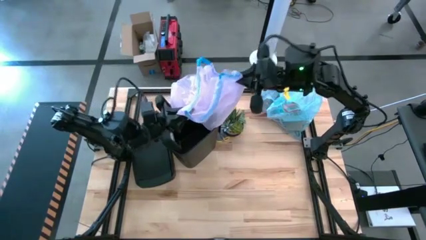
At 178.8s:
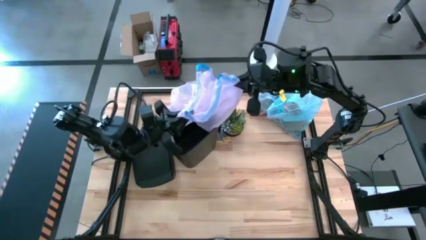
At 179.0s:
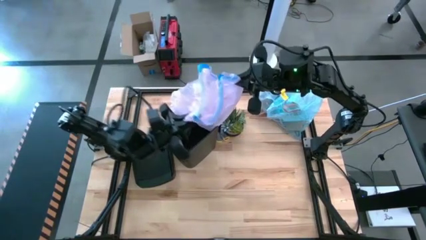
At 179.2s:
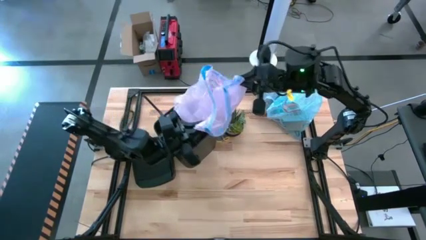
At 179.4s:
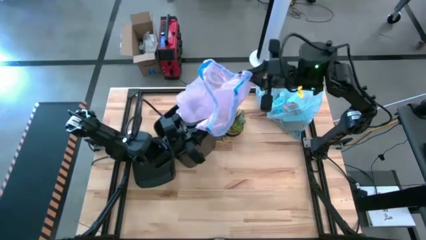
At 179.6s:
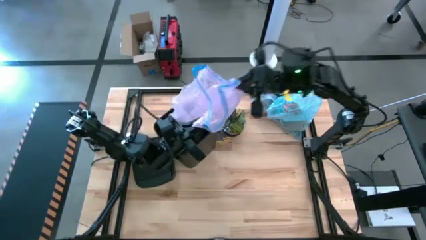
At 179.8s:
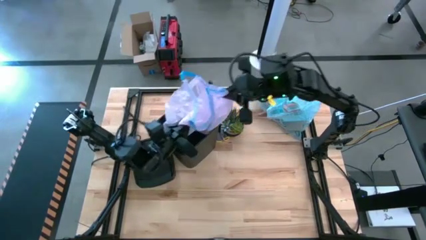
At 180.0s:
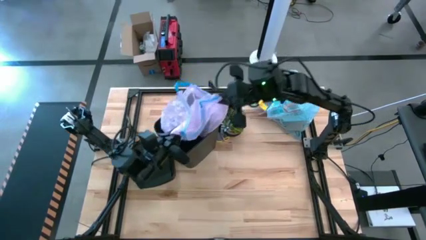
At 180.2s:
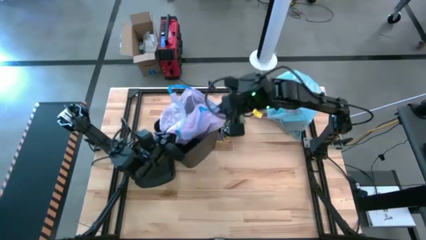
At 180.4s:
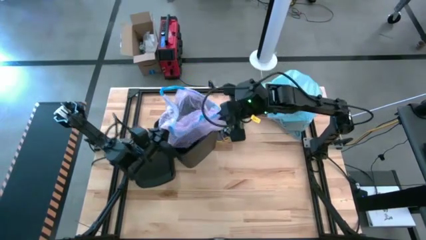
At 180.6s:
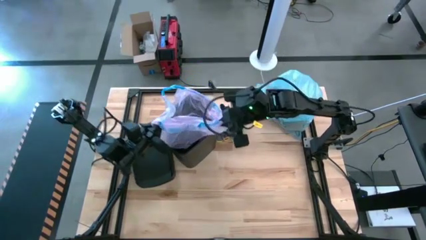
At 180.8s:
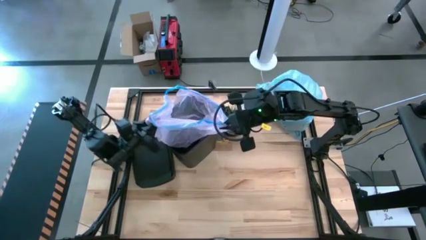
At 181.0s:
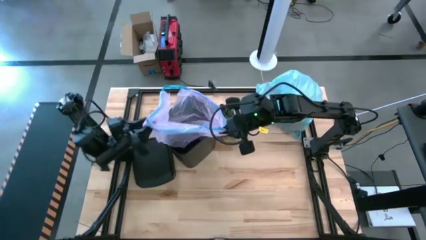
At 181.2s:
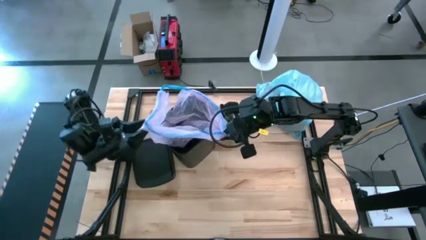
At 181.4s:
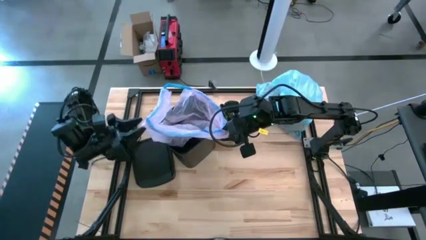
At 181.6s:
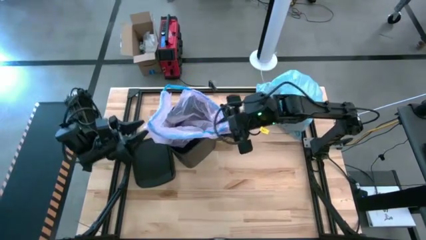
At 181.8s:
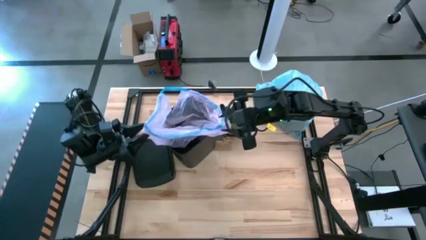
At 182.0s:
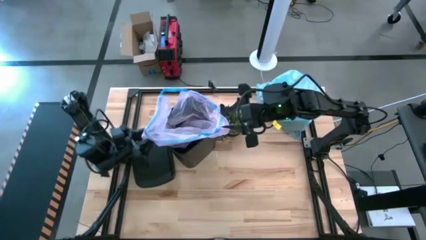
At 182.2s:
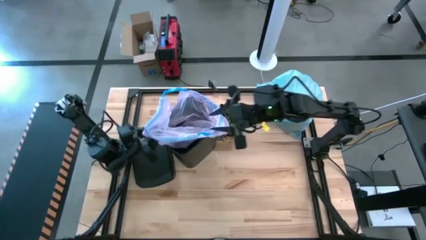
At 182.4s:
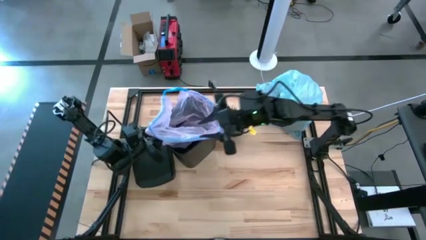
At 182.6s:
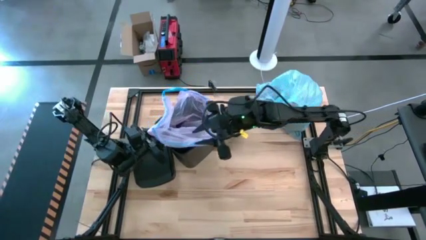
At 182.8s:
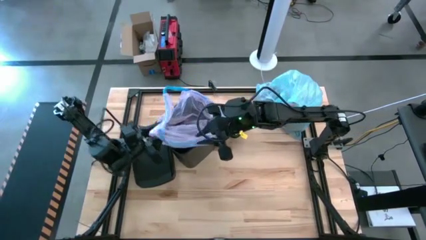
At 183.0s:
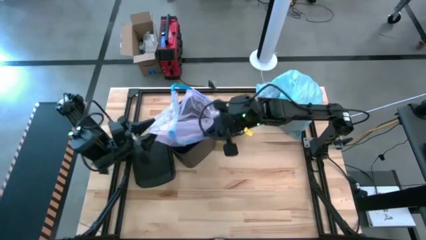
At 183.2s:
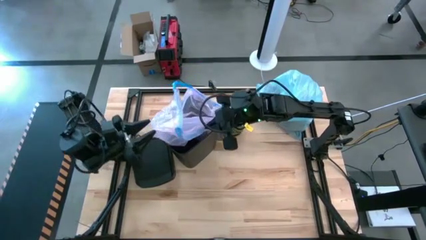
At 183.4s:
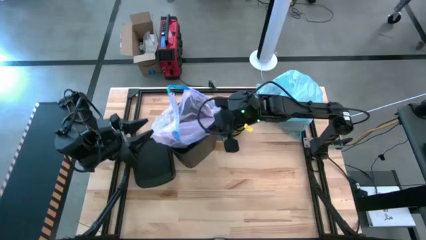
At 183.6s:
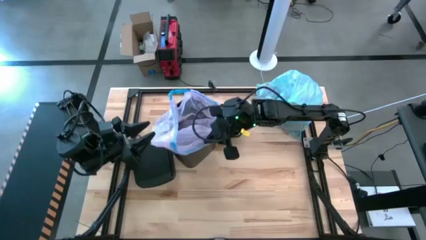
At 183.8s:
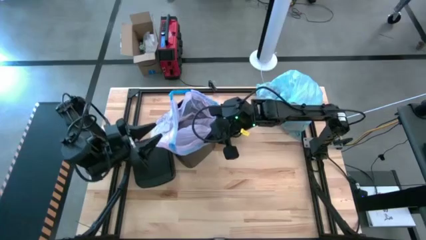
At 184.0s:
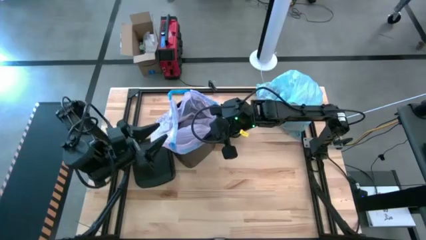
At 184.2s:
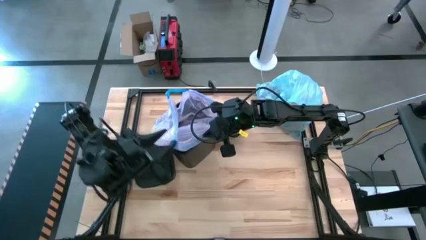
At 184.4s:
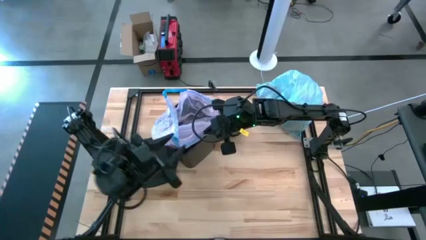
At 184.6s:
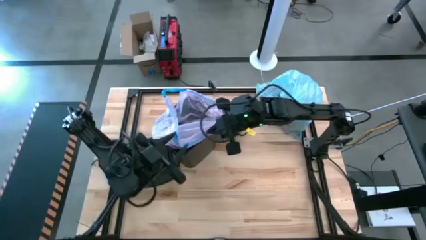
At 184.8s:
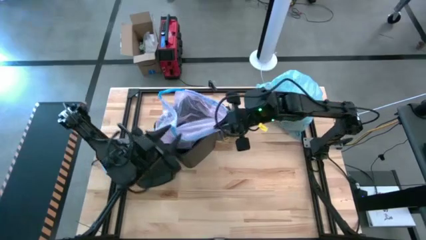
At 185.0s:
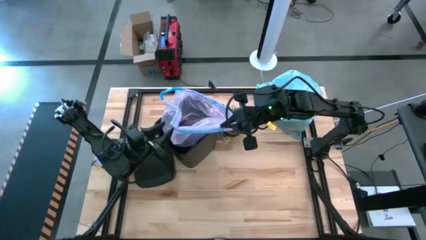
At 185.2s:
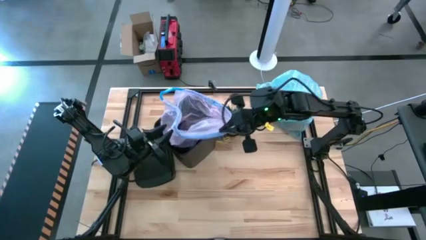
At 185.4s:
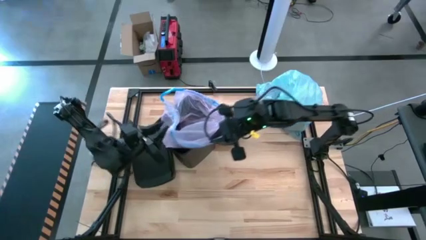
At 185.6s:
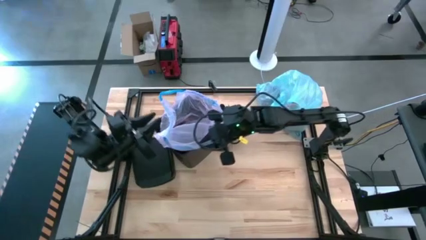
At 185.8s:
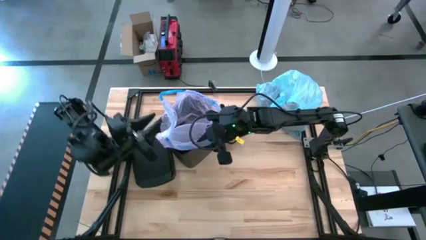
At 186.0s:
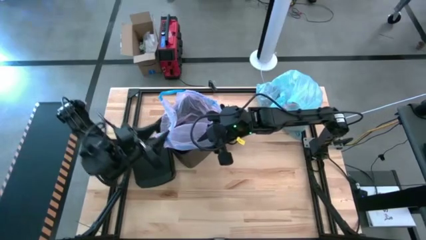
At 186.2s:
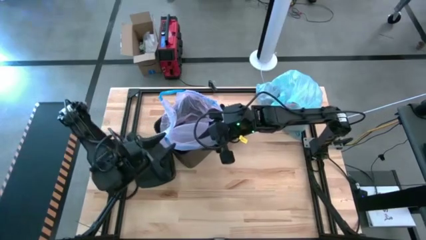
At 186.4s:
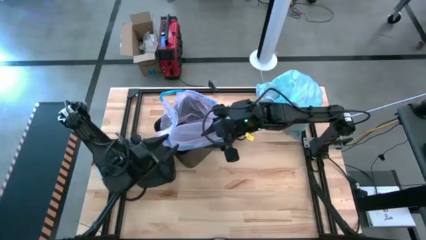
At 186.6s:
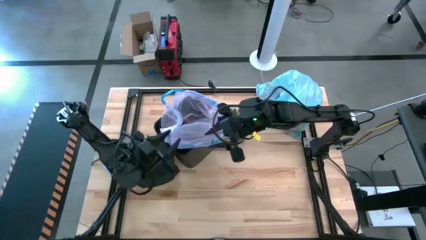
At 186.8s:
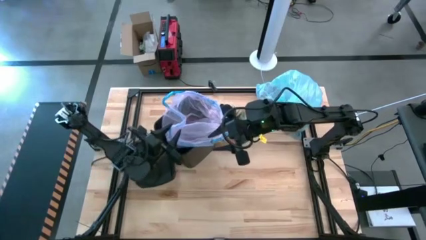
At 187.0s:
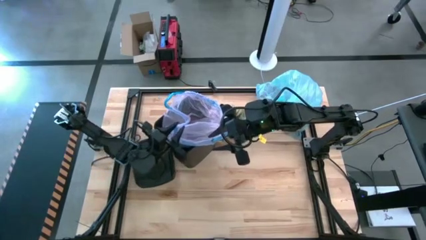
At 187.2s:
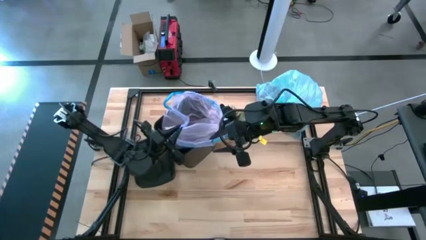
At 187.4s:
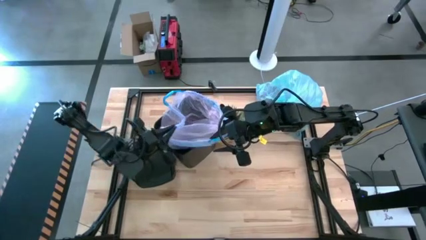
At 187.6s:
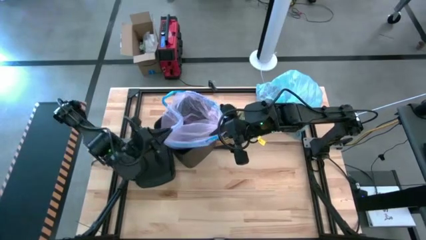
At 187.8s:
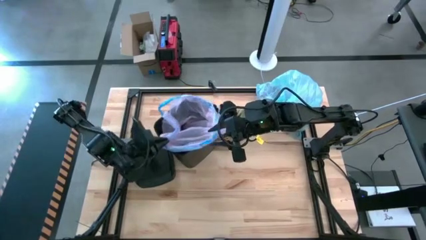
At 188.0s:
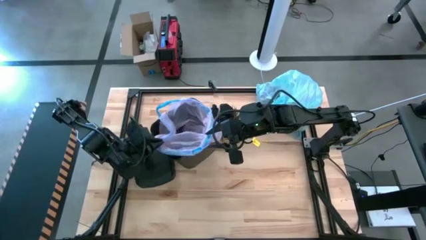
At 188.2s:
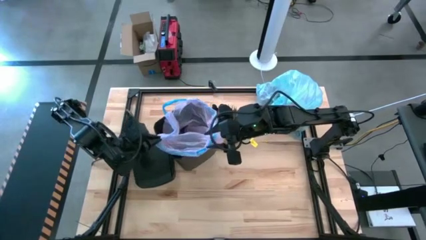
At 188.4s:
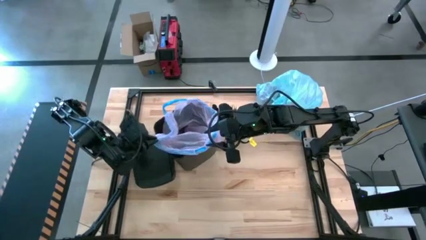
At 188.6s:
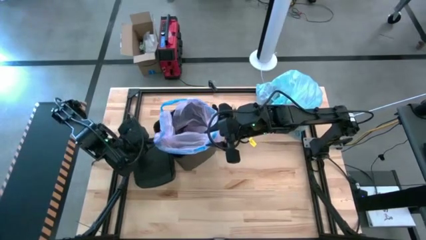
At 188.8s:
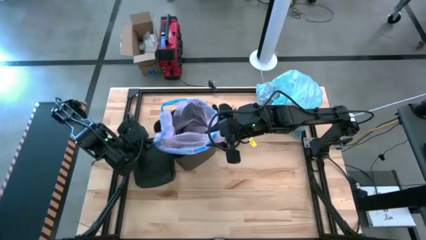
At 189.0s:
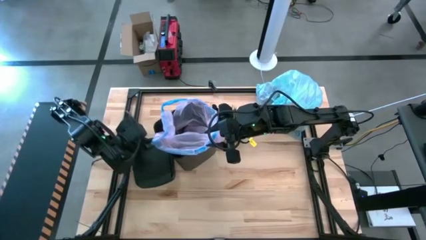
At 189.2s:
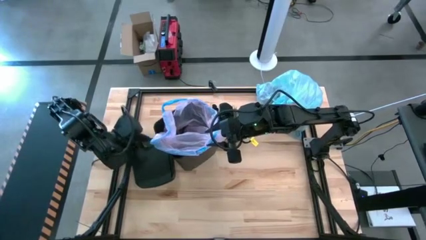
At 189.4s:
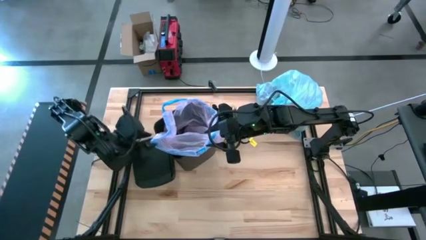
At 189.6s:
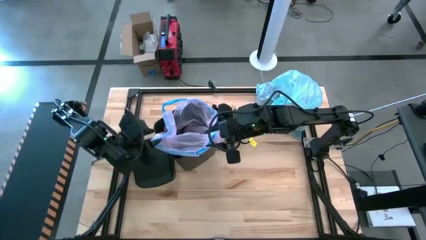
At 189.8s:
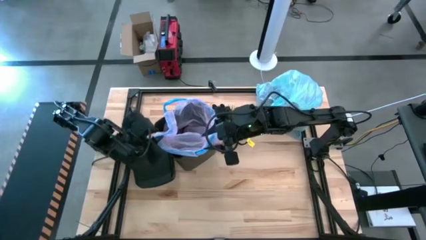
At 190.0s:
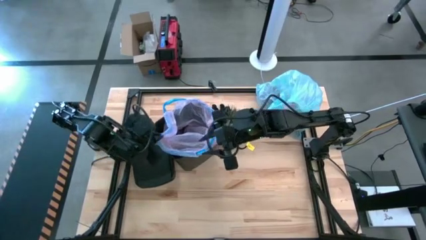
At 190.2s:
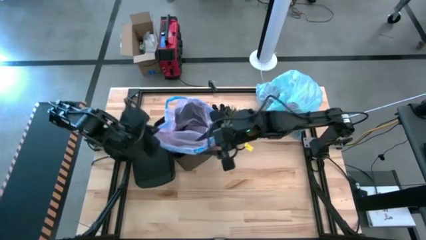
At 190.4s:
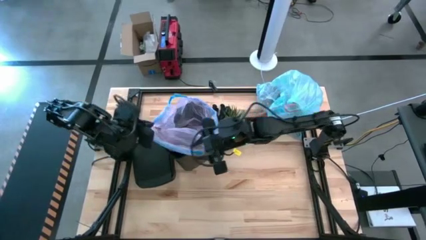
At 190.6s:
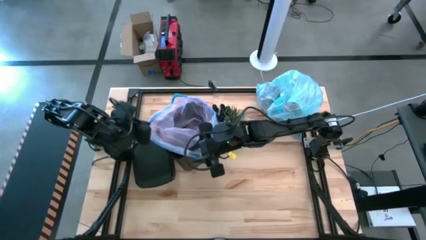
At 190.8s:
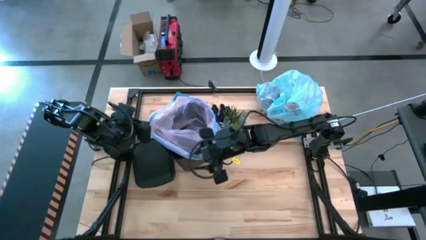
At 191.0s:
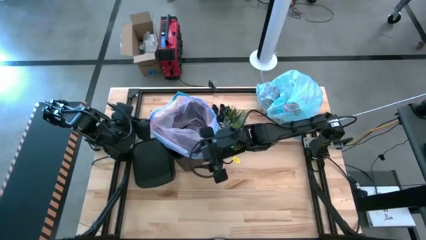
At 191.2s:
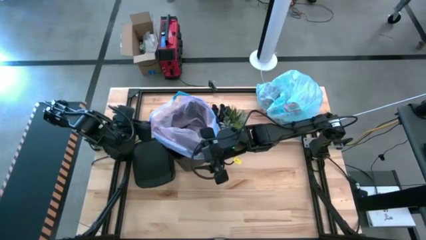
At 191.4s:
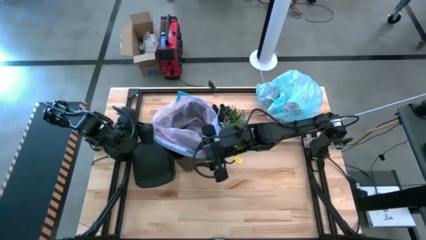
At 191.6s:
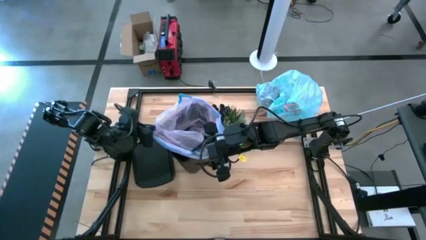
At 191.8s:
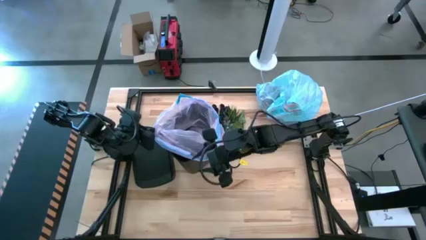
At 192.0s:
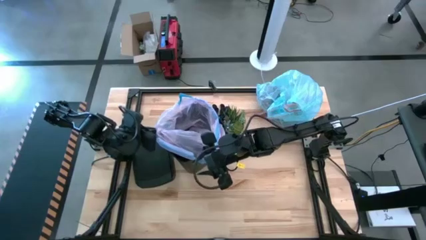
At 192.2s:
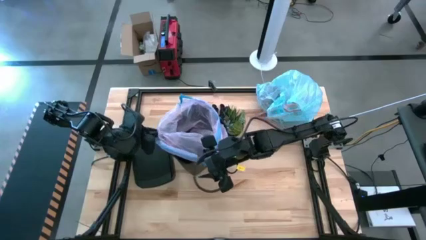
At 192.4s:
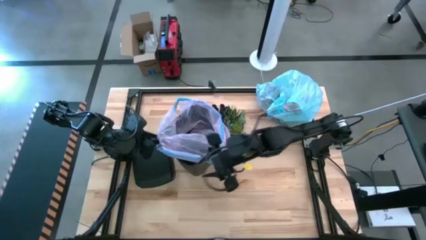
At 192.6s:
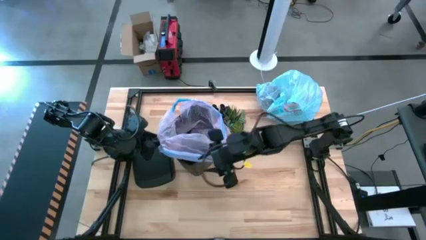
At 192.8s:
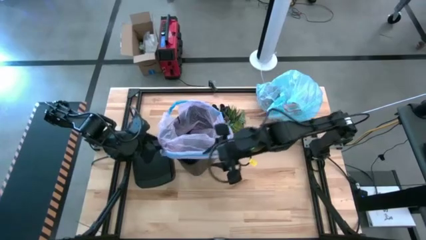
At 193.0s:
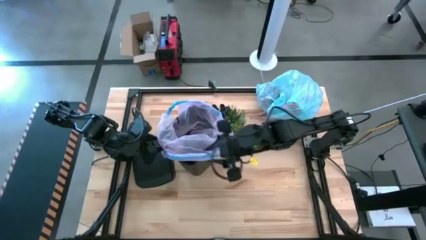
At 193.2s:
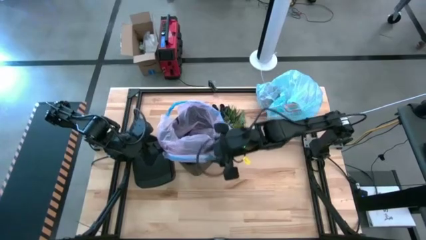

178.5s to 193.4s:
Task: place trash/remove bag and relplace
Insert a new pink trash bag into the trash bin

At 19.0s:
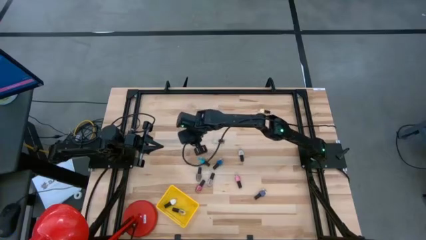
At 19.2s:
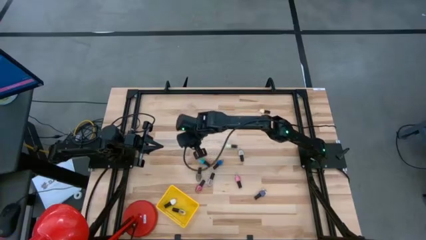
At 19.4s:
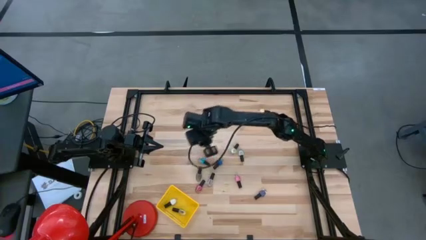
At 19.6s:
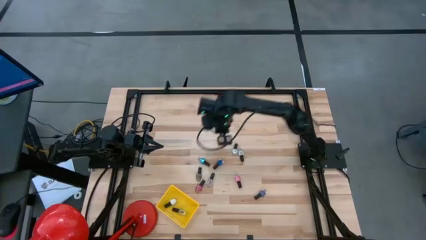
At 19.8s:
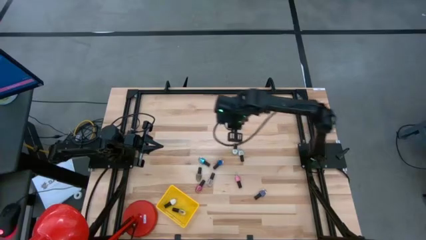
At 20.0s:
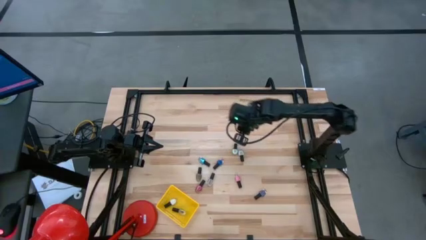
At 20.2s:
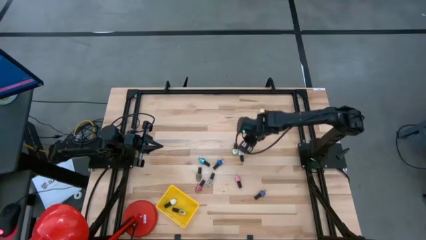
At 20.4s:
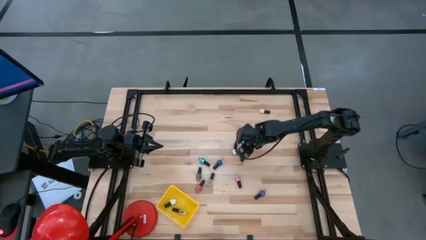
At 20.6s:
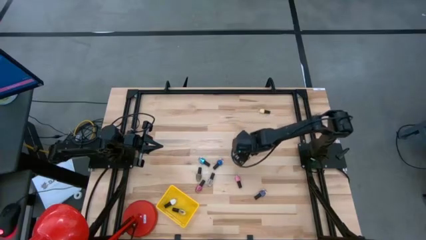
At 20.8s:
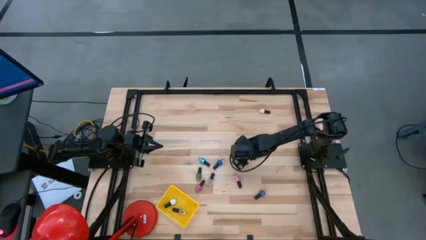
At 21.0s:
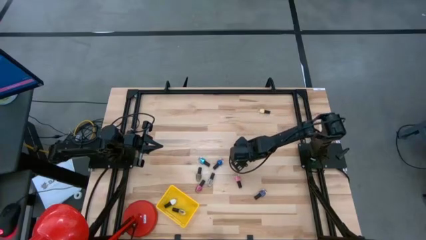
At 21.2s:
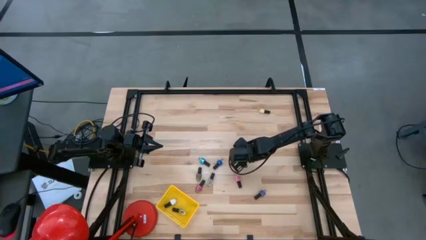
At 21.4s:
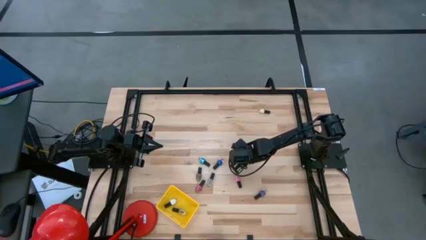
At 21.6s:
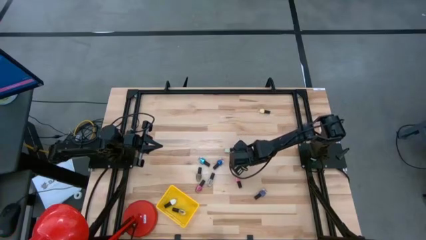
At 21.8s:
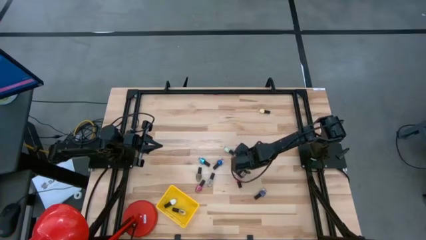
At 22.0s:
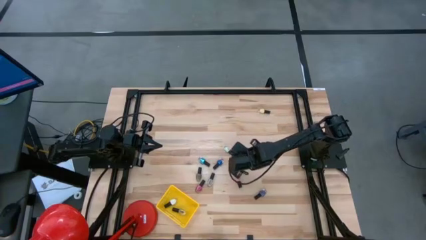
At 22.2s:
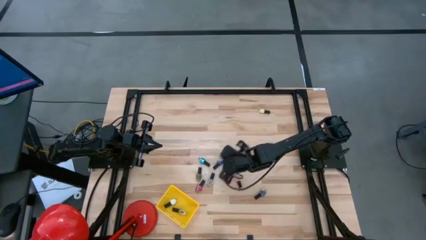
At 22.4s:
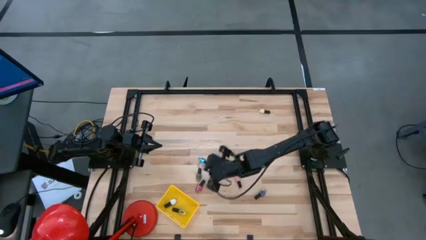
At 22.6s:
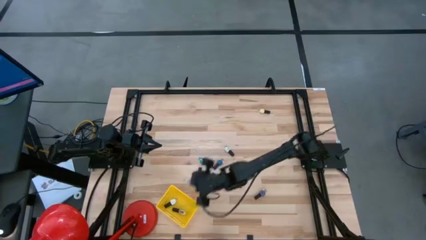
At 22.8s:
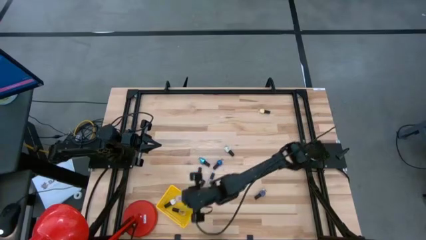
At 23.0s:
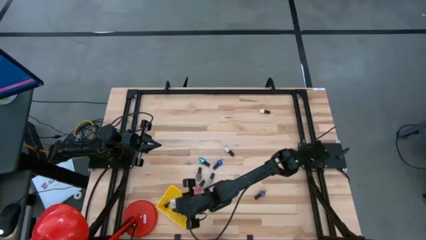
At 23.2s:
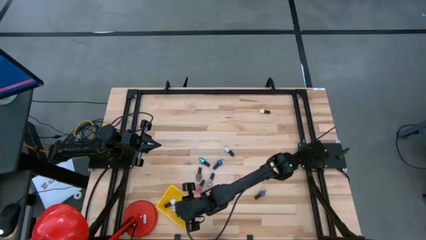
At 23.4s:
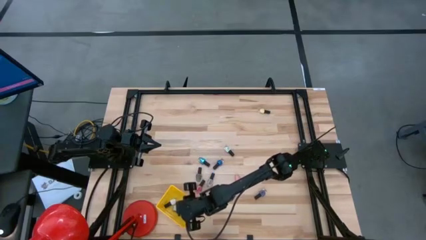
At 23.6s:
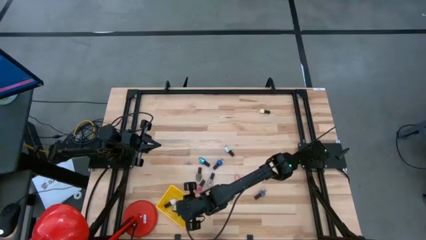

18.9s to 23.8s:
Task: Pick & Place Nail Polish
Put the white nail polish into the yellow basket
